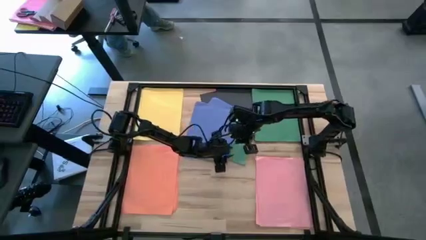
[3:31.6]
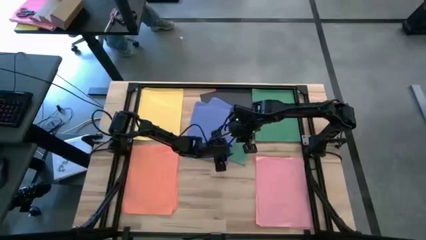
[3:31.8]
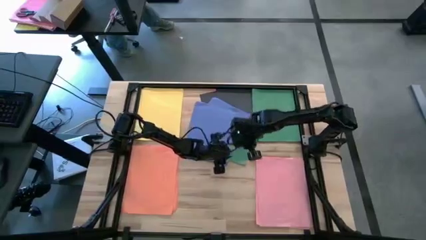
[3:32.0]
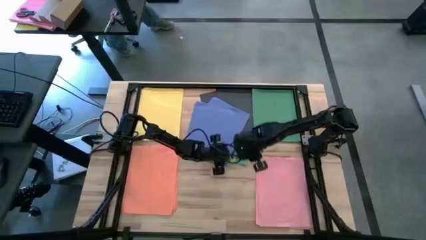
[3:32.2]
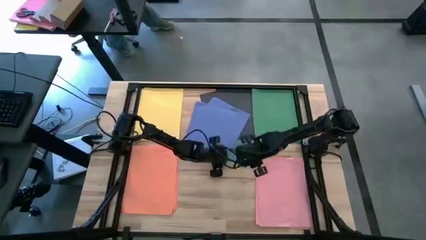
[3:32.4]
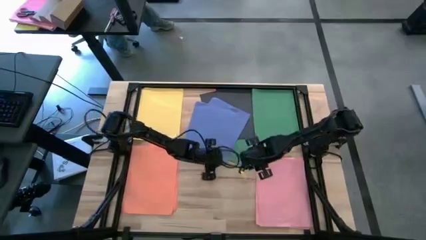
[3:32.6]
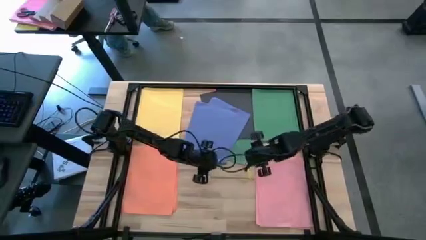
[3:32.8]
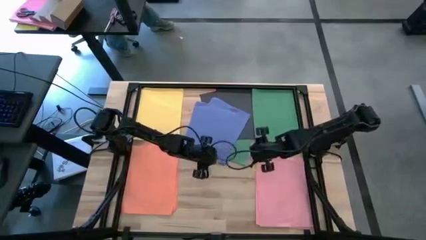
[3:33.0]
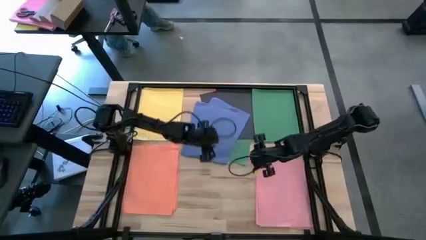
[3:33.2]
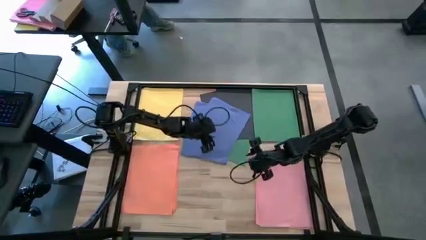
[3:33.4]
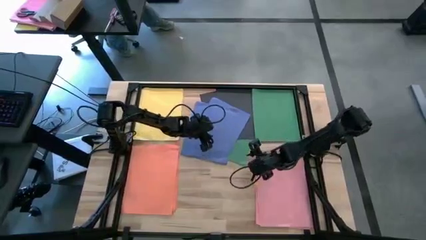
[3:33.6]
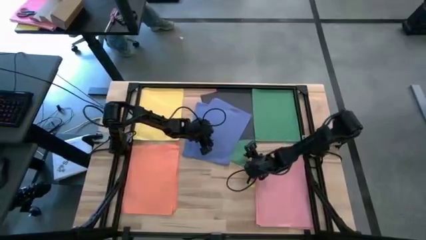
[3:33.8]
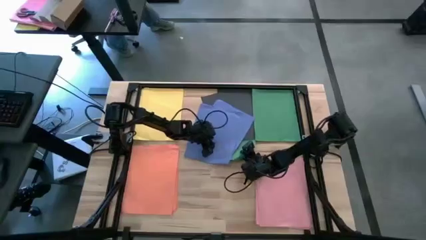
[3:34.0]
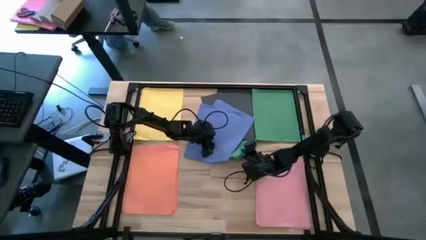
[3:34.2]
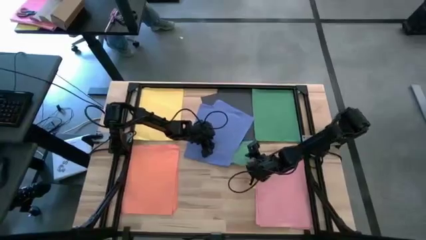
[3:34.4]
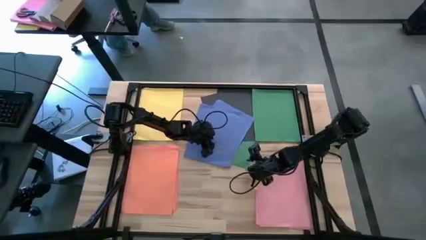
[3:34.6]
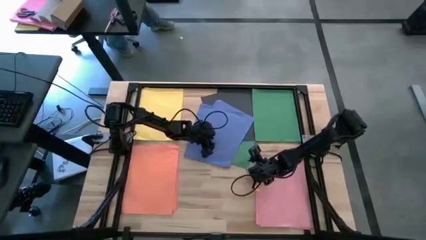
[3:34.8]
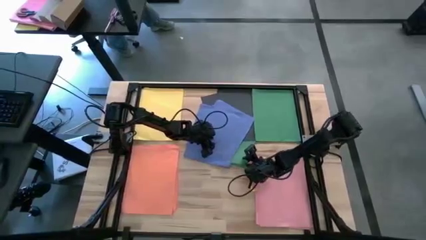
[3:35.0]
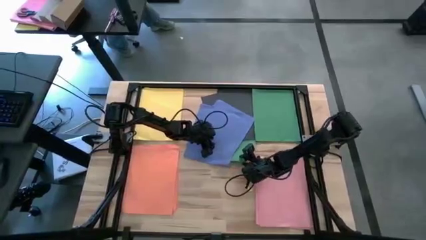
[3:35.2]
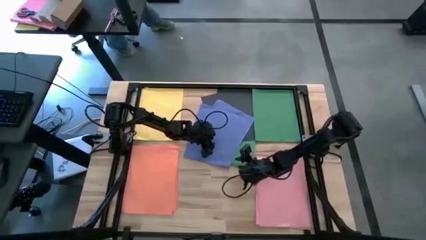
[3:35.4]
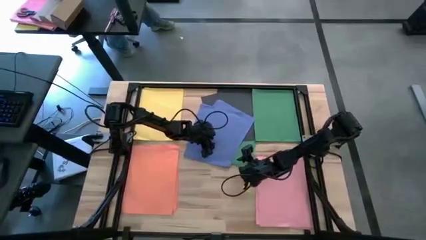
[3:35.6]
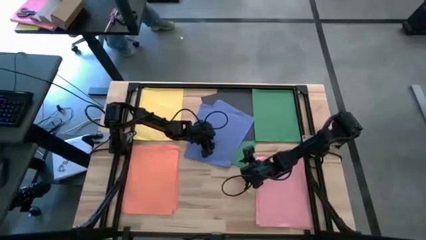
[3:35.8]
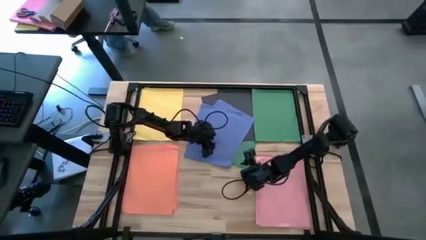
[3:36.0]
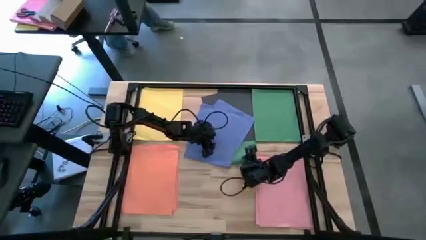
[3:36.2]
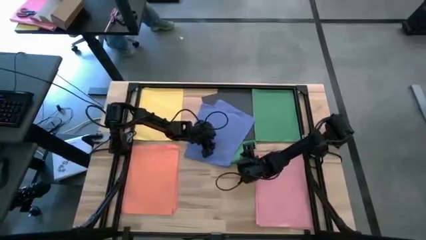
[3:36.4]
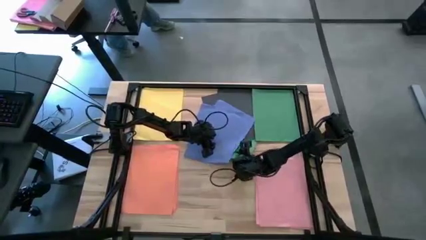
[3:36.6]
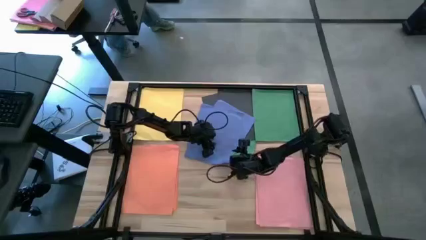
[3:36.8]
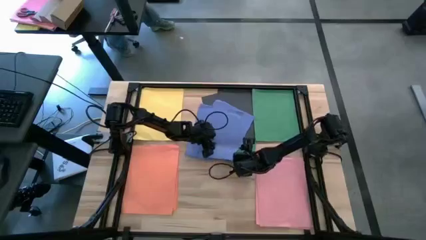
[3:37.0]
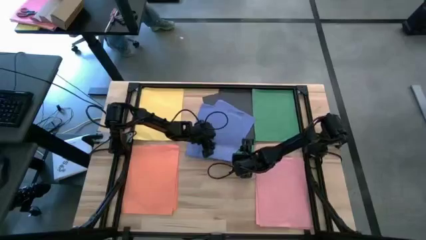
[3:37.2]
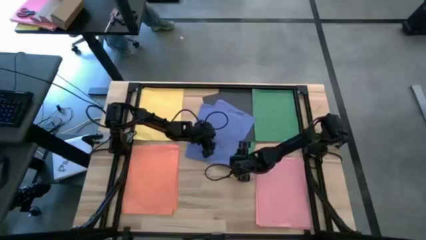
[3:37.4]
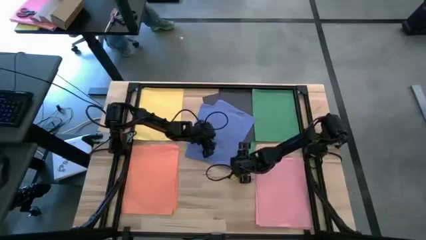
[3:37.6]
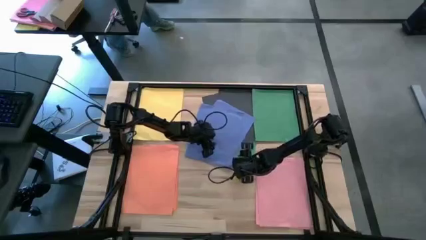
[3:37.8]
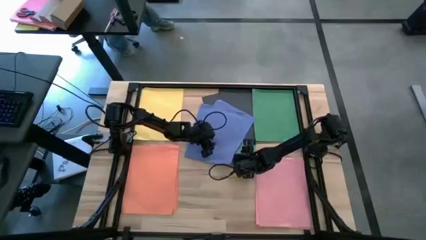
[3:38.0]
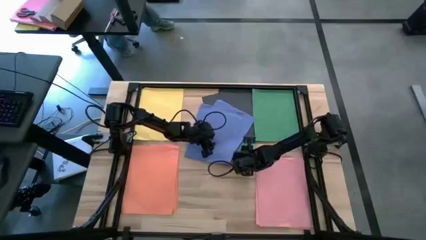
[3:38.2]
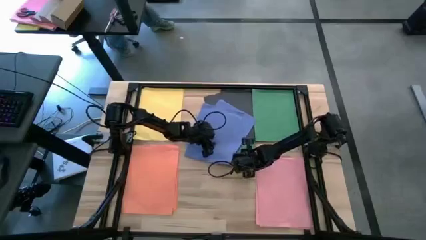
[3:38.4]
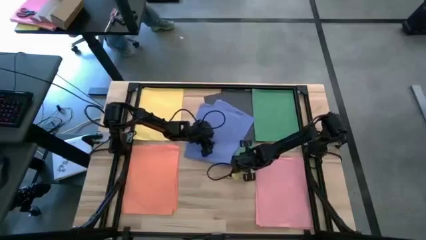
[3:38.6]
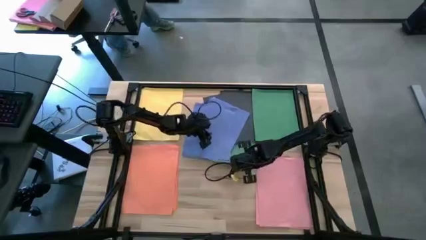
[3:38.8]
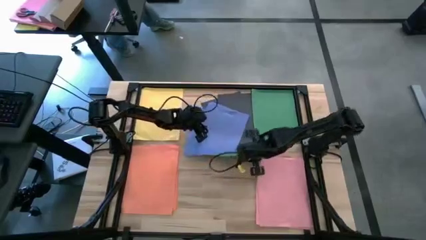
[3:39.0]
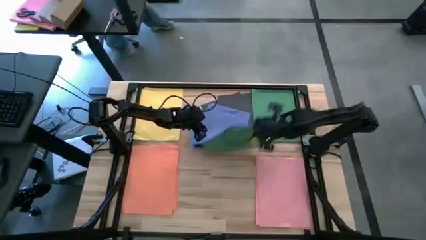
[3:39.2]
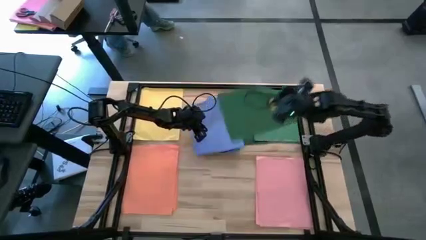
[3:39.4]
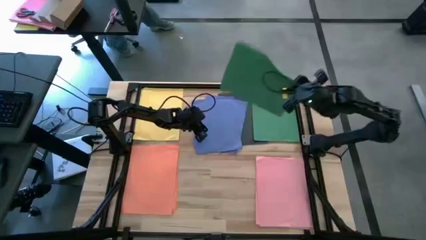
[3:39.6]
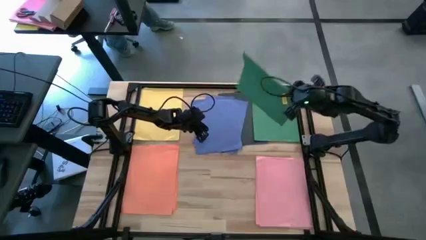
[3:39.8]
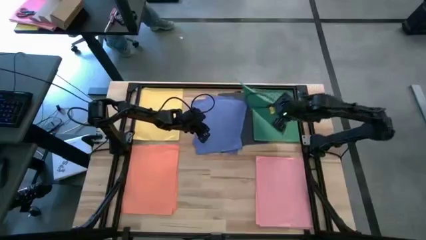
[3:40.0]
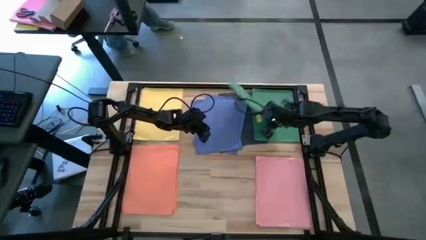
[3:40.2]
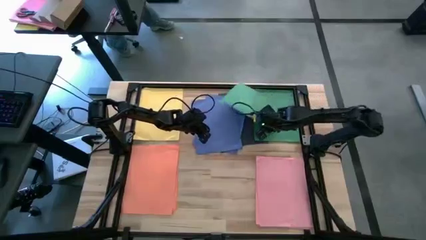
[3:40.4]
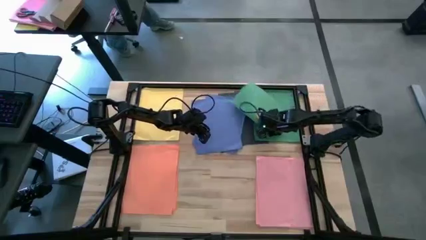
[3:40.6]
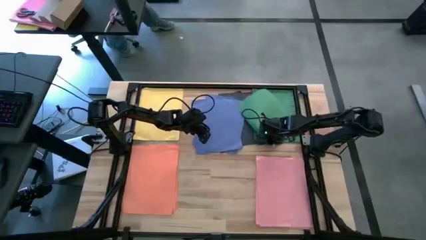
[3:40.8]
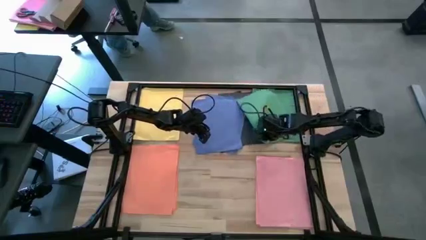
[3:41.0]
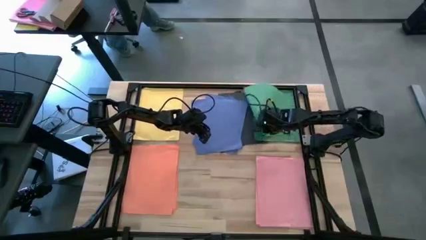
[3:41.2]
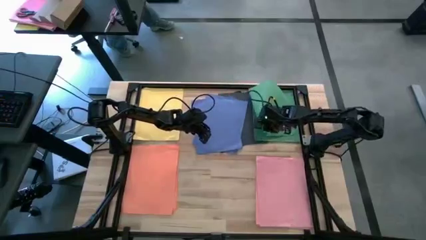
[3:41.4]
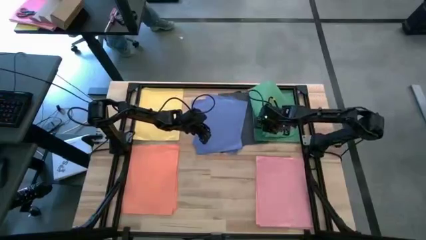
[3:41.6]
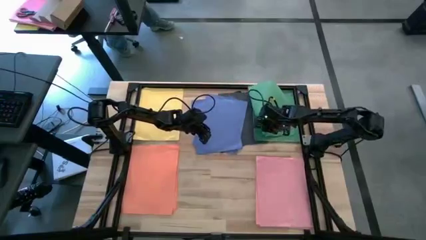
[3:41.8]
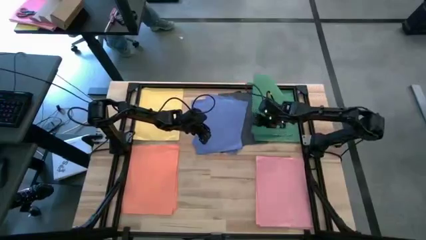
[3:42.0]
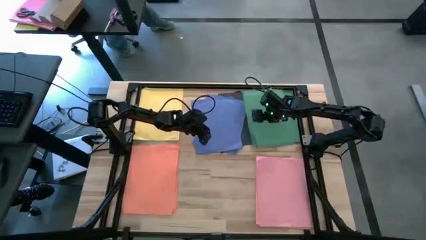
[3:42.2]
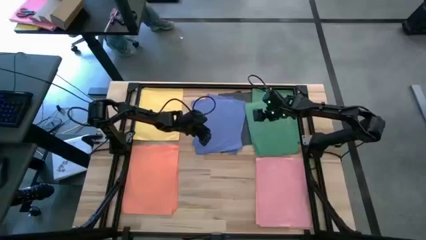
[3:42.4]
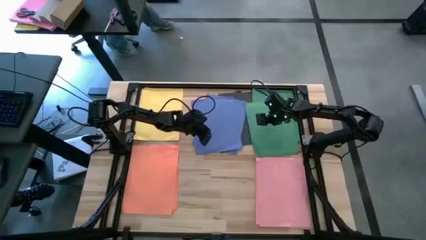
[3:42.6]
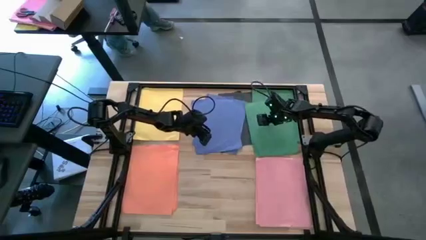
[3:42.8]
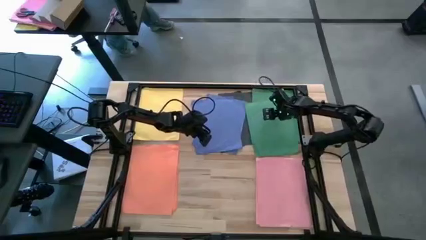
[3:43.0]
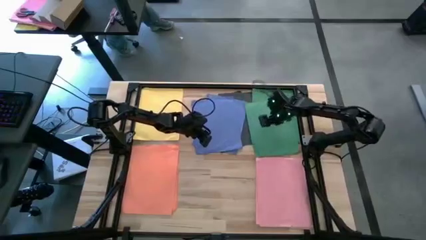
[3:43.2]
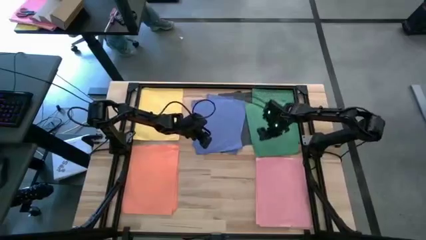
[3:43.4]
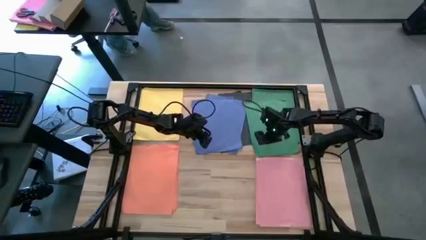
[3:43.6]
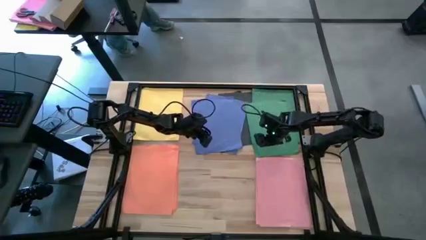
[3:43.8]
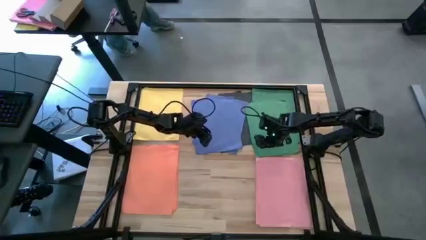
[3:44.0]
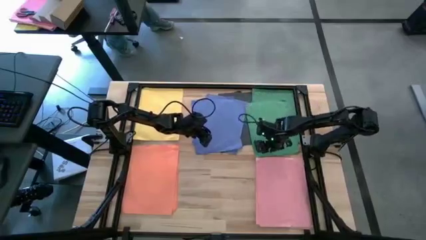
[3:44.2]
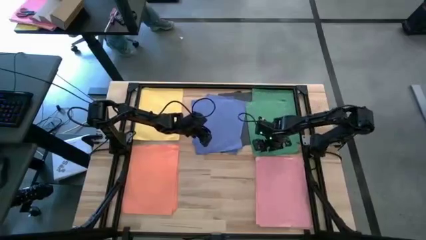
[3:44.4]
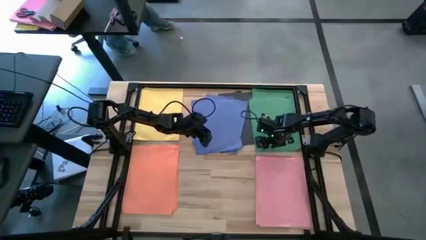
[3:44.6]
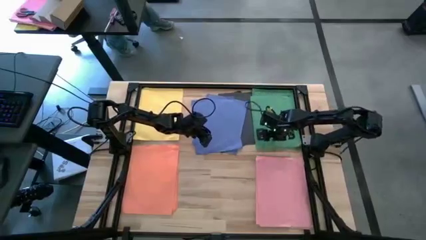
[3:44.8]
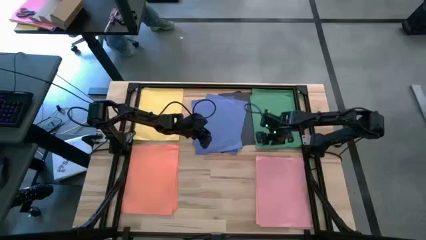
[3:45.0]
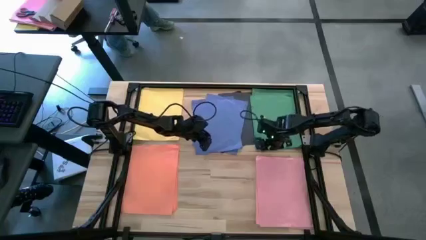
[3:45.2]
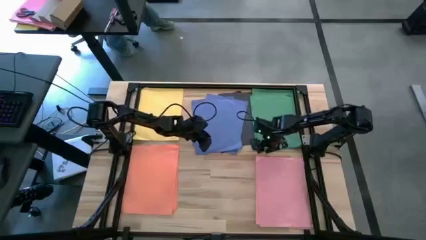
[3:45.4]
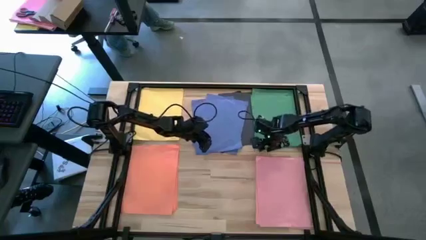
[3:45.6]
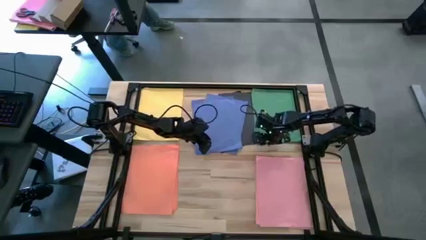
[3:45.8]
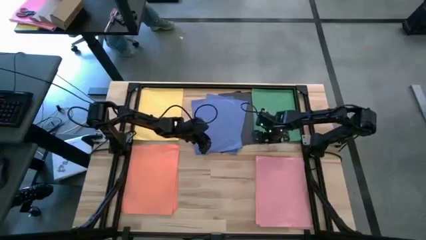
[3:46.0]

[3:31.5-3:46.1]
Task: Organize paper
Stack the green paper on top of the stacked green papers

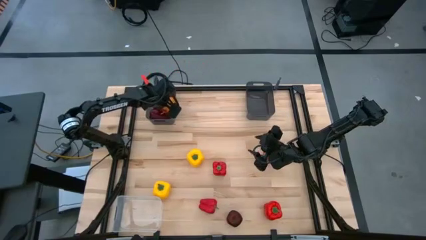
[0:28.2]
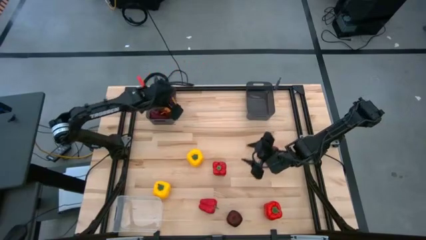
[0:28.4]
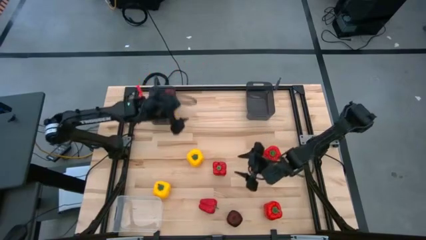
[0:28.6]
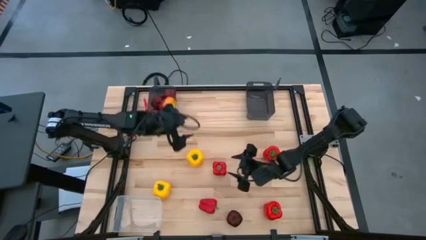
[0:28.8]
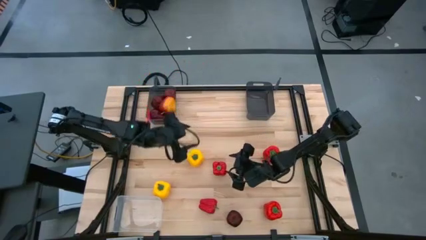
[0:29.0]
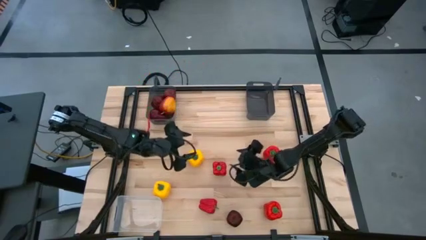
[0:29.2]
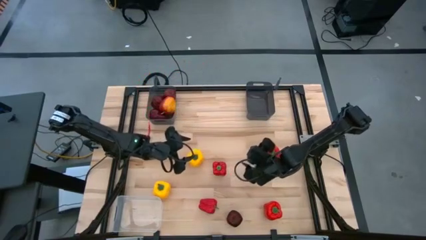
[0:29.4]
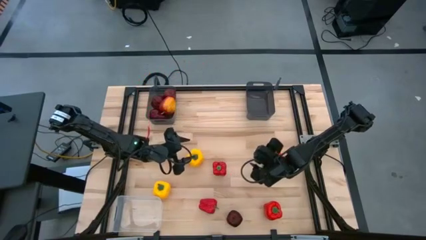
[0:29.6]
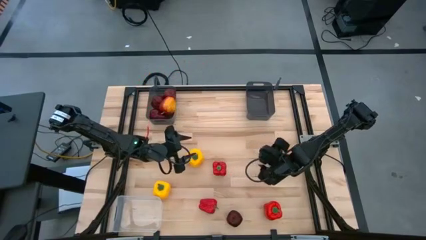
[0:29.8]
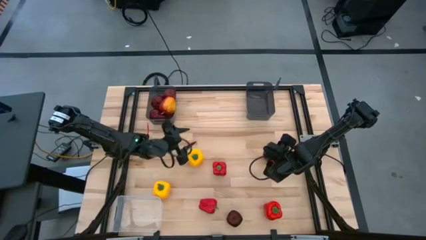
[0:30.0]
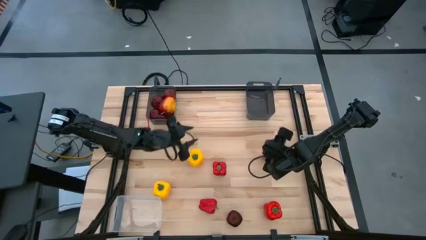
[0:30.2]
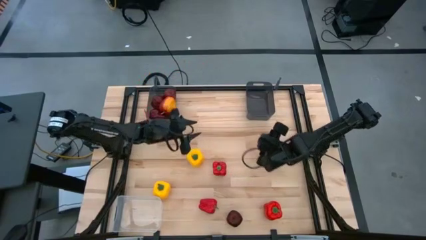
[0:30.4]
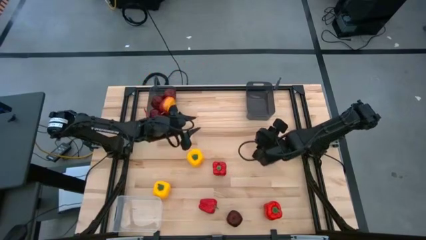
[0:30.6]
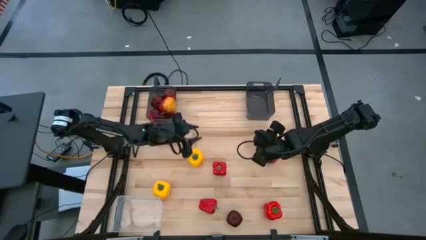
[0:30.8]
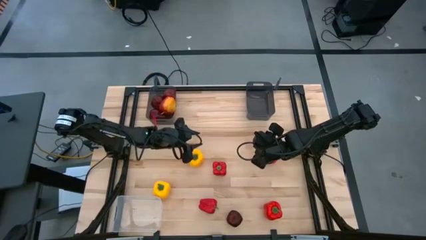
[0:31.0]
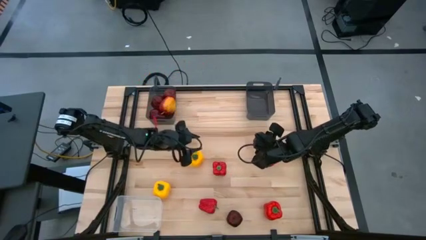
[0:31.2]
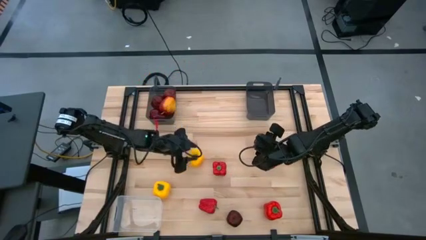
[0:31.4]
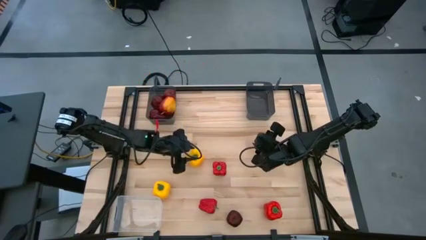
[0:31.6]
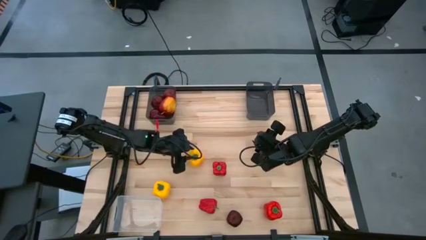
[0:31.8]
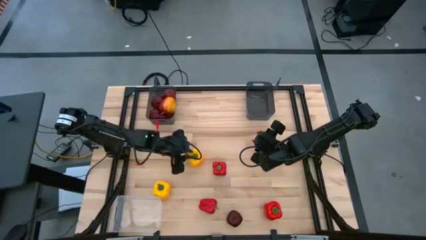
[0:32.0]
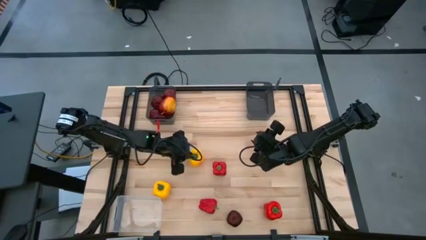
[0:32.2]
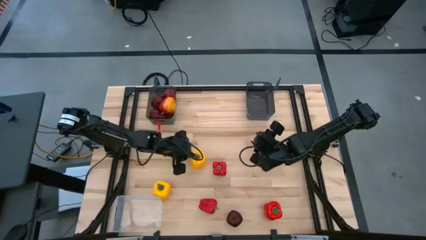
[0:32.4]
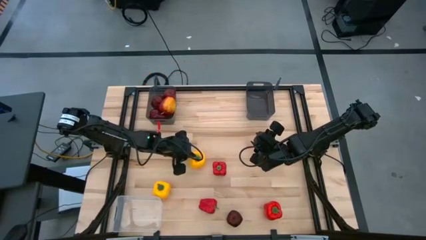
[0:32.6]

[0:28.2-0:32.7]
Task: Sort produce into baskets
Put the yellow bell pepper into the transparent bin
